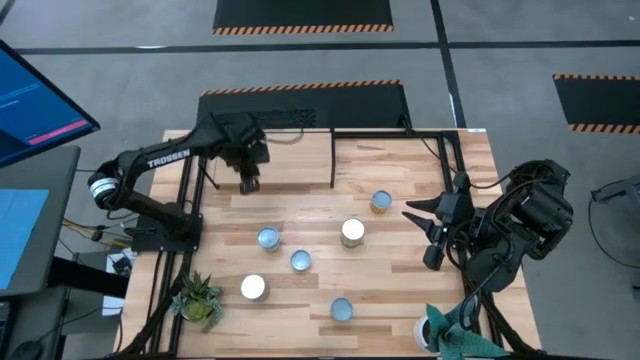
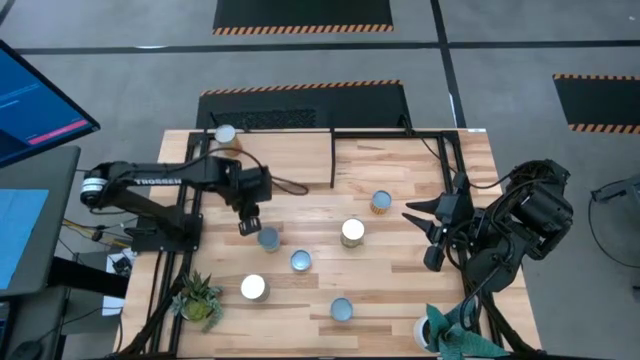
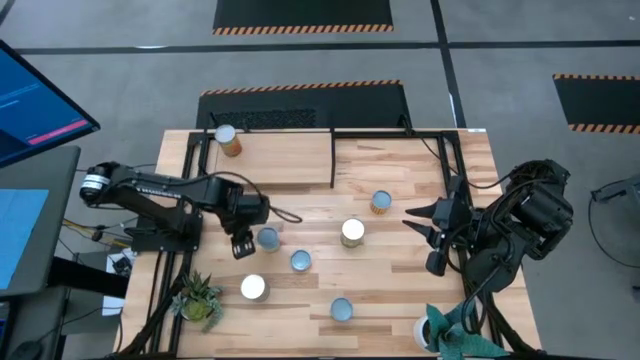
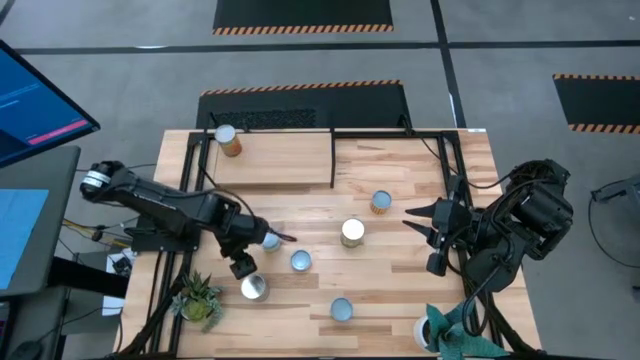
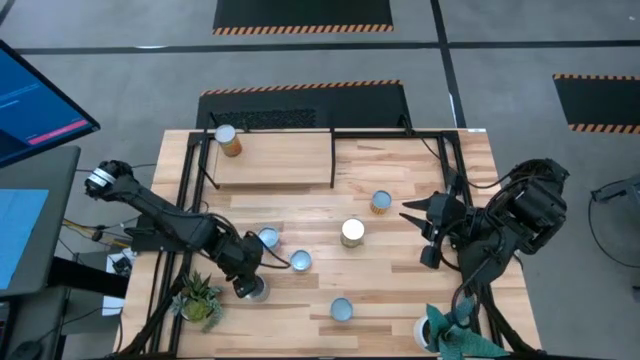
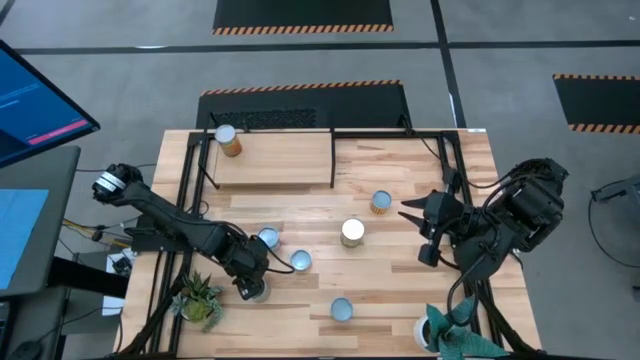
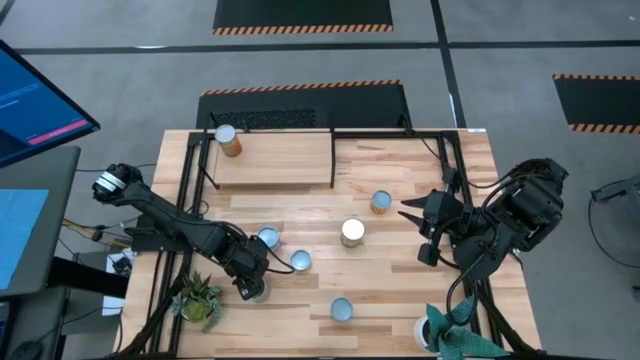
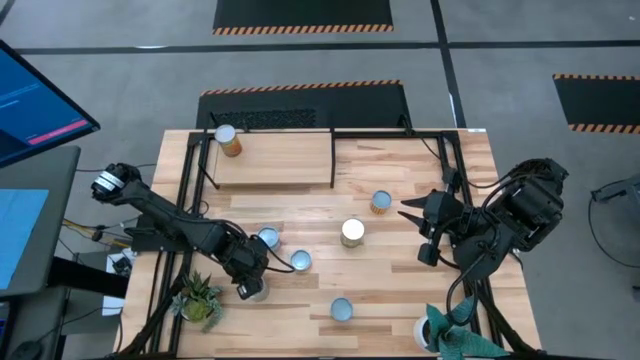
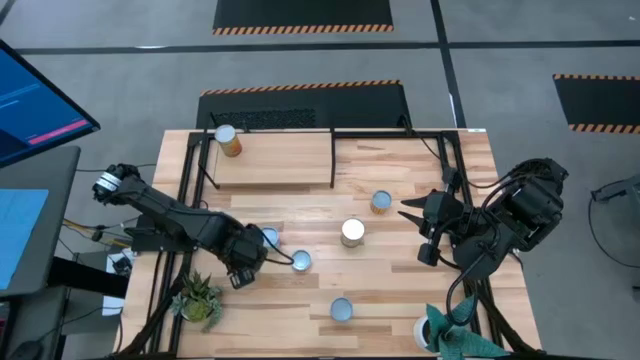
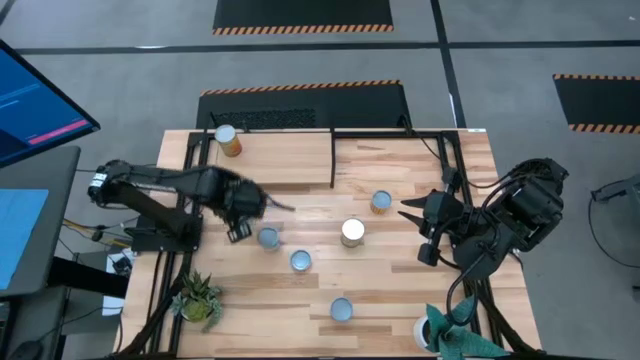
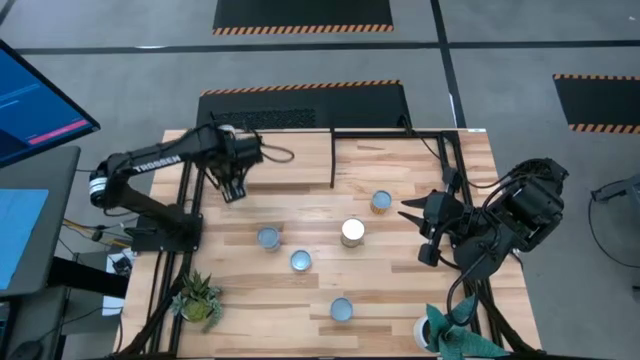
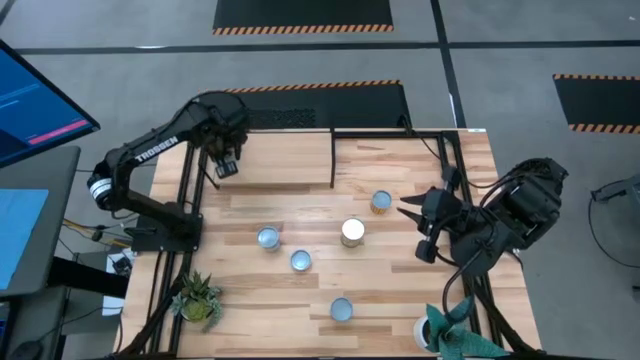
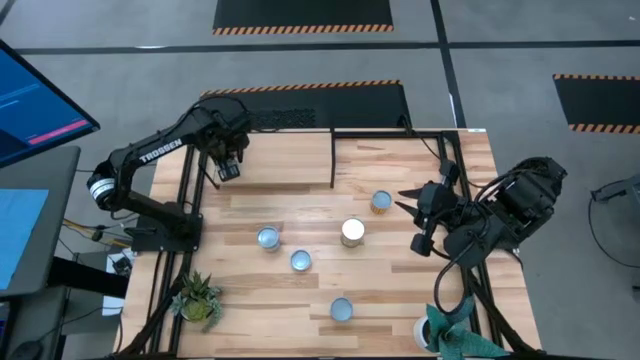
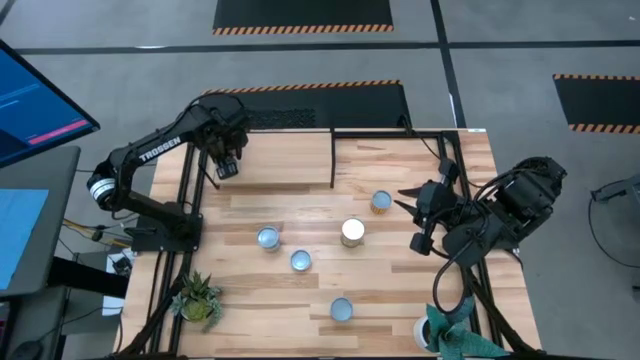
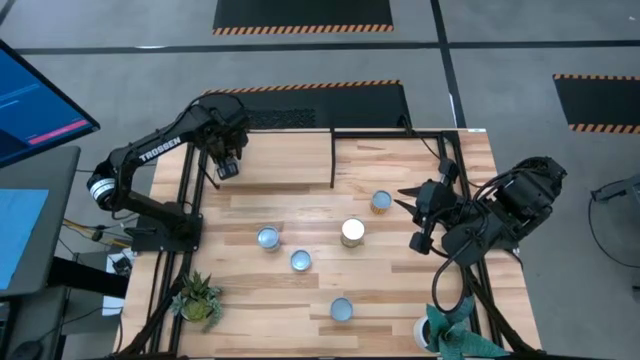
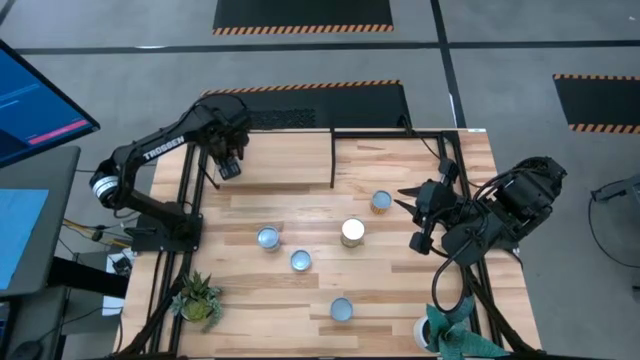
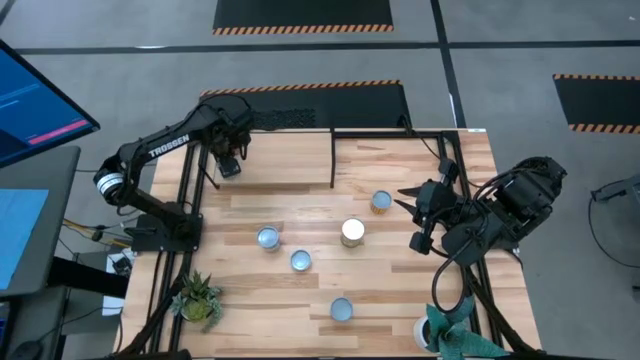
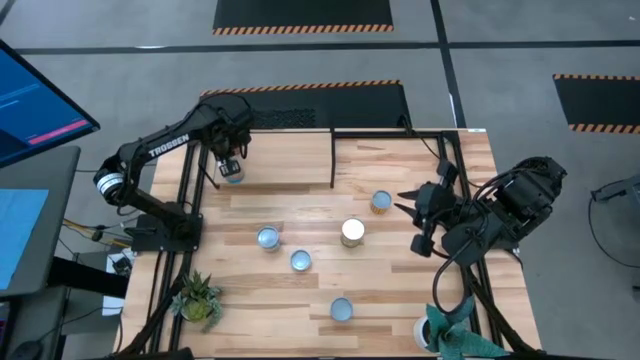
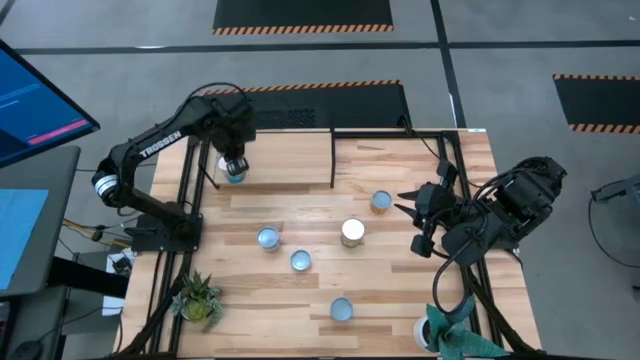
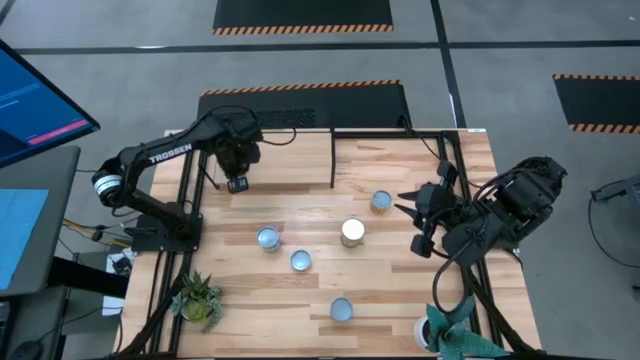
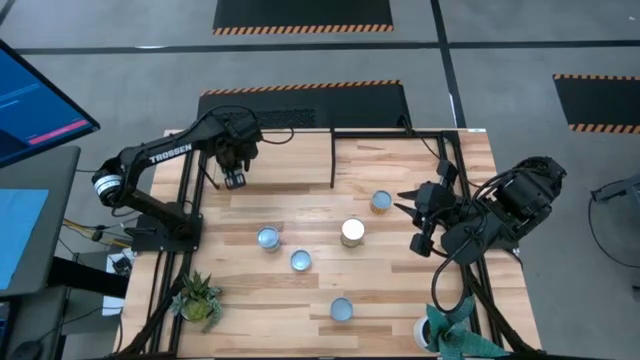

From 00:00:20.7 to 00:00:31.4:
Task: Pick and place cans onto a shelf
Put the tomatoes can on the shelf aligned with the green peas can

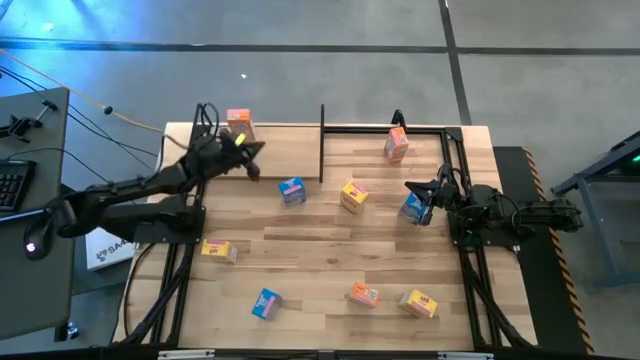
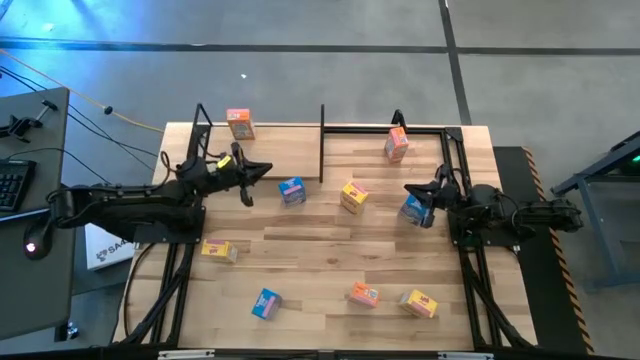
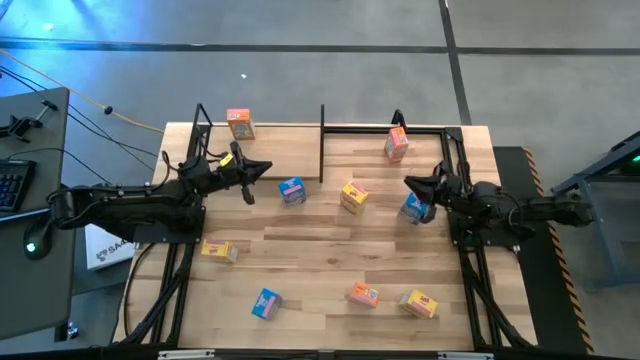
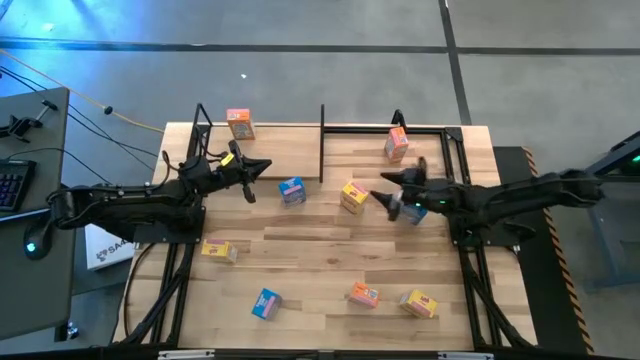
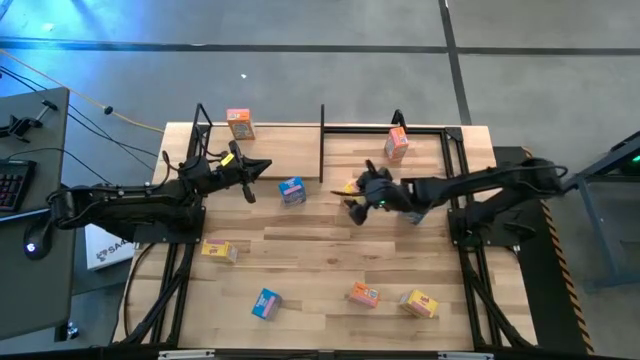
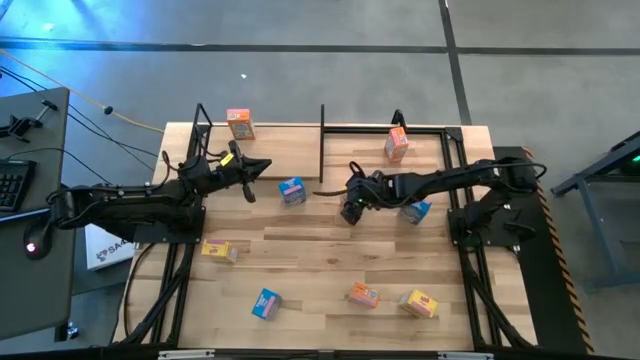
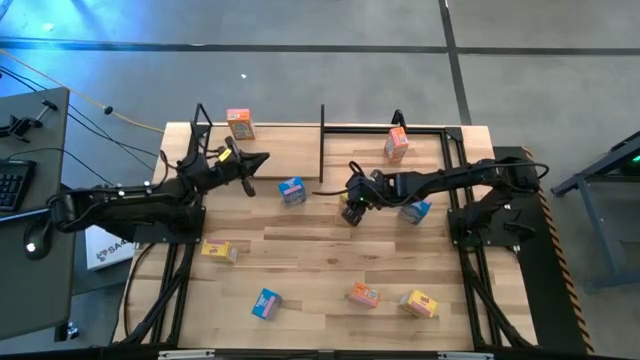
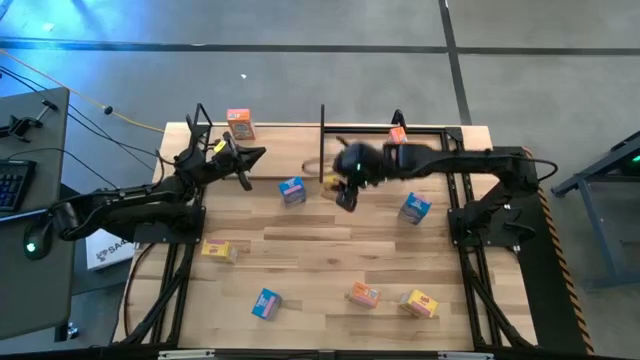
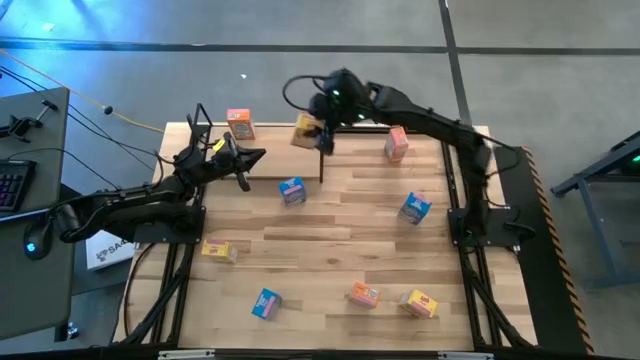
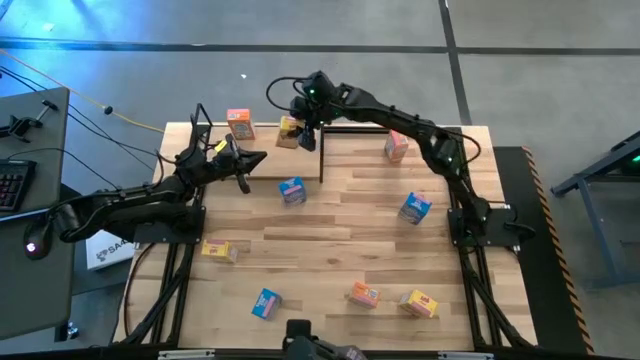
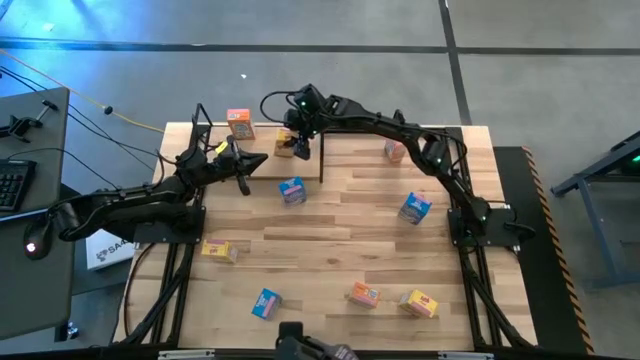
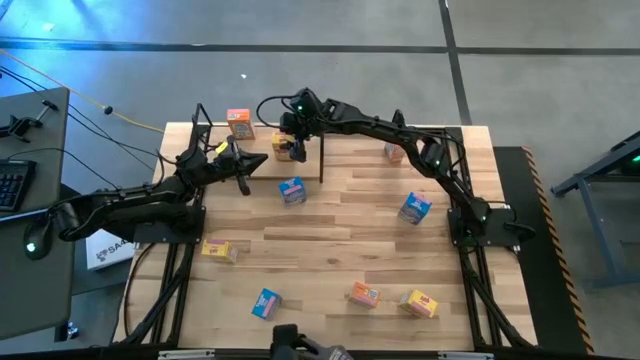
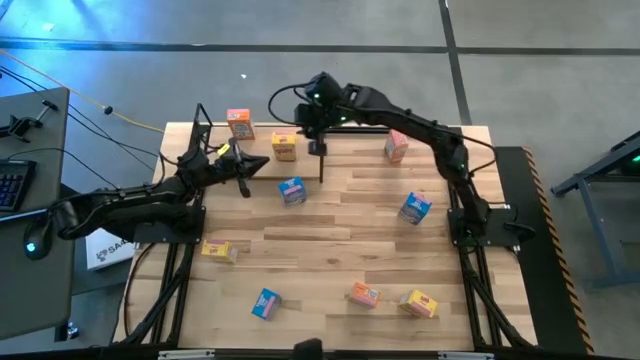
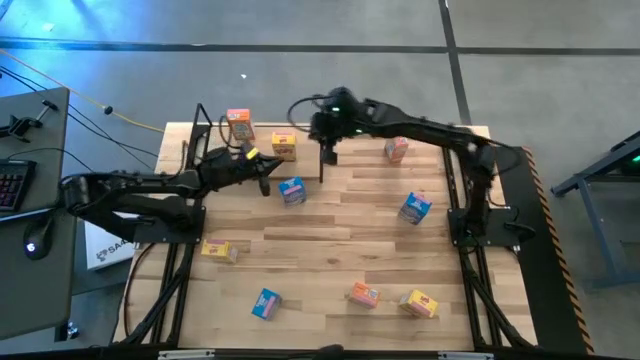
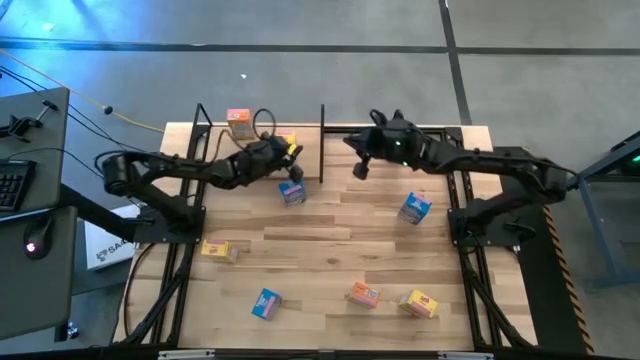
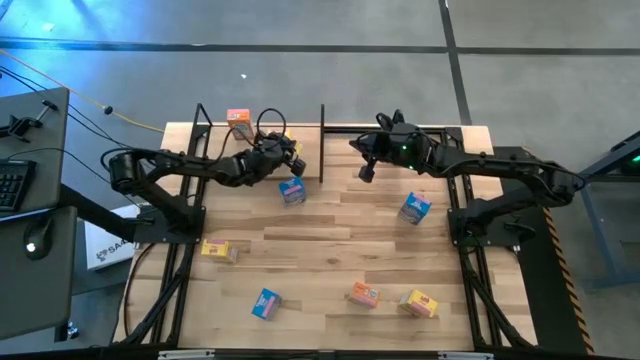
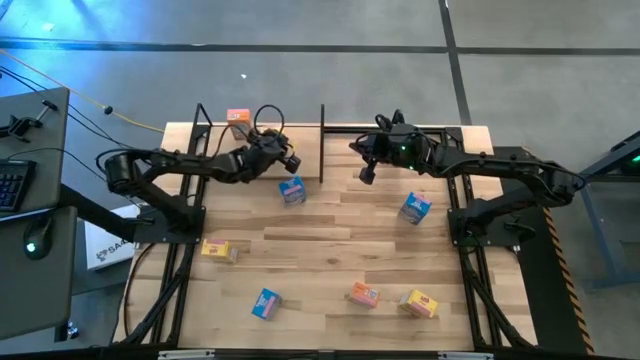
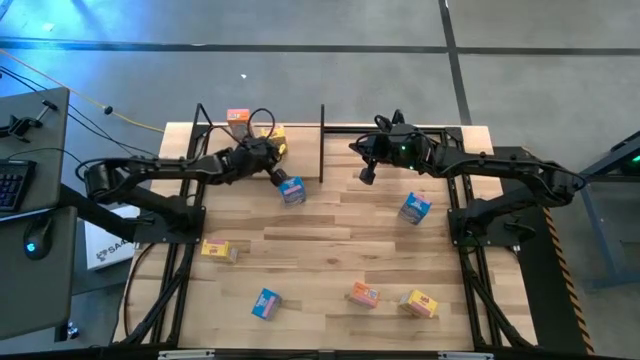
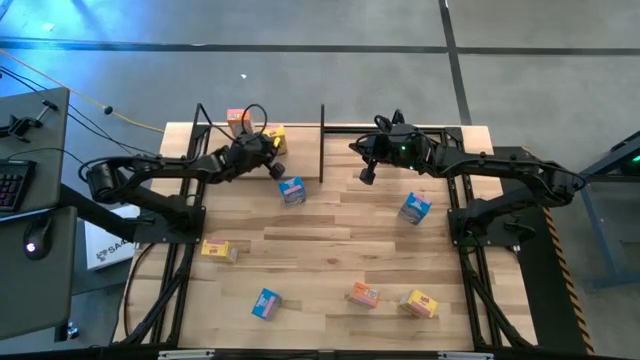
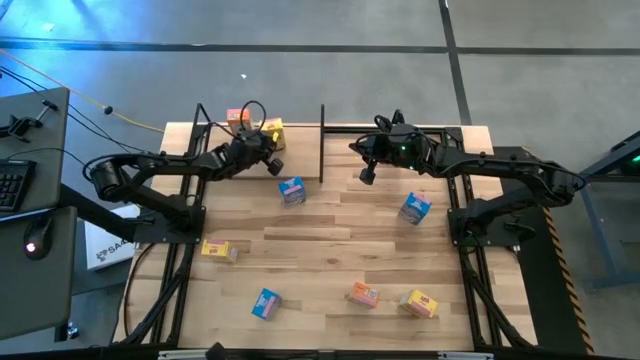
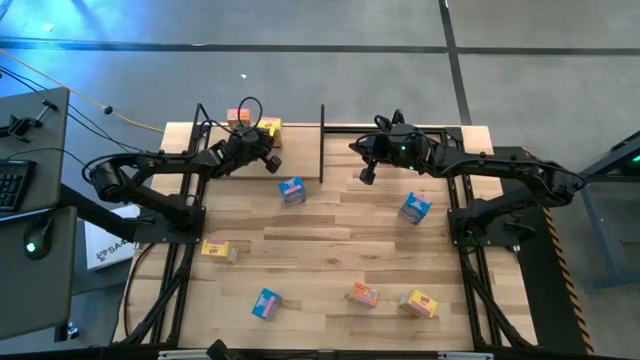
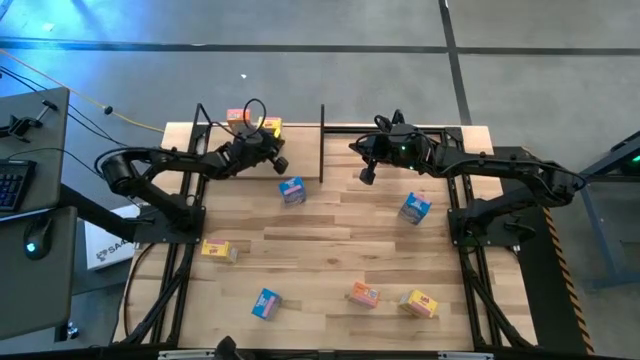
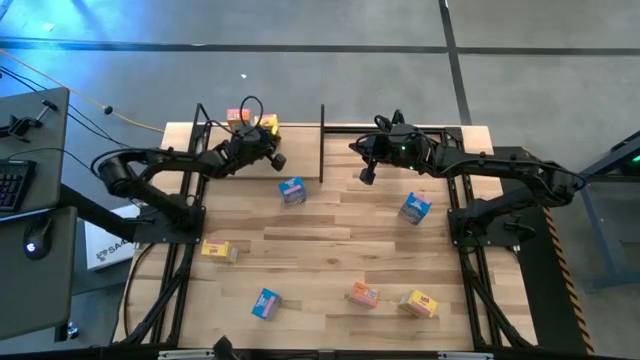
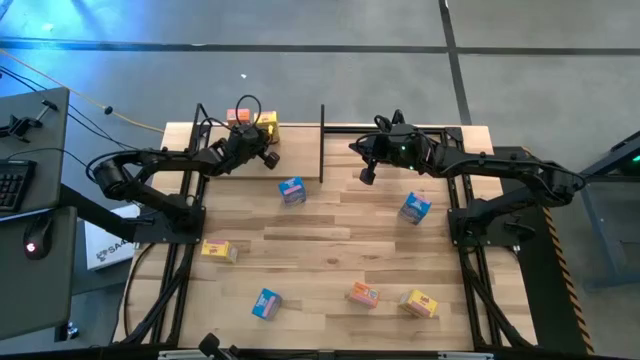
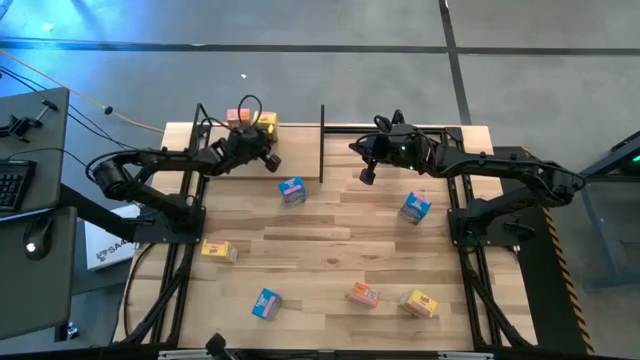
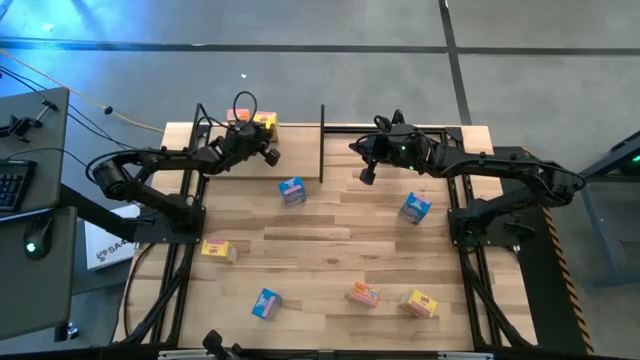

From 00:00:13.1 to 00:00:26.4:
Task: Stack cereal on shelf
Put the top yellow cereal box on the shelf
